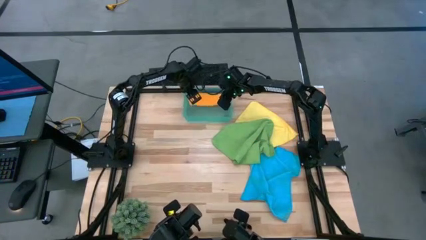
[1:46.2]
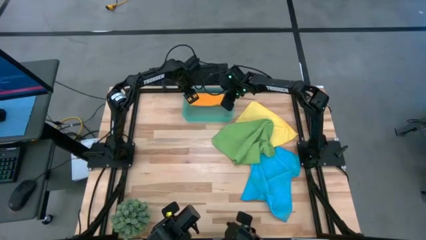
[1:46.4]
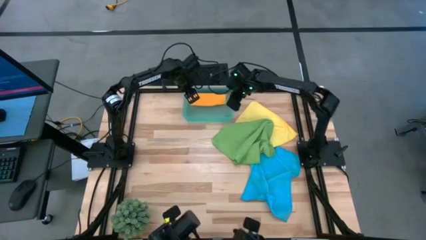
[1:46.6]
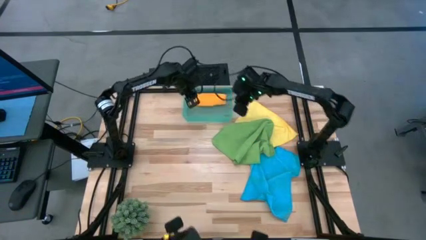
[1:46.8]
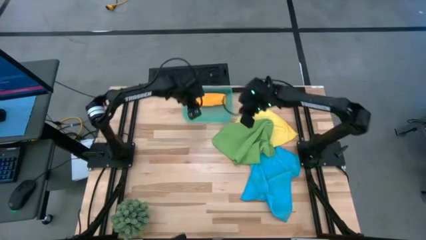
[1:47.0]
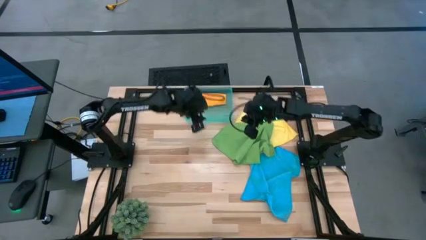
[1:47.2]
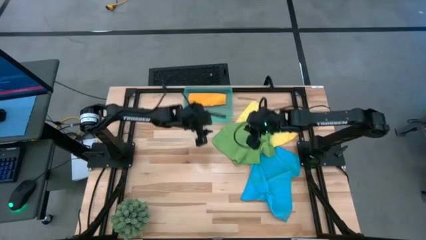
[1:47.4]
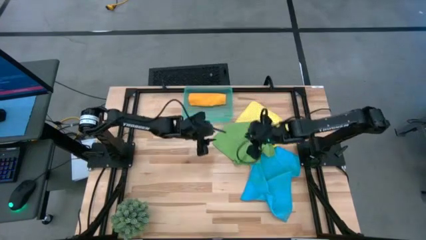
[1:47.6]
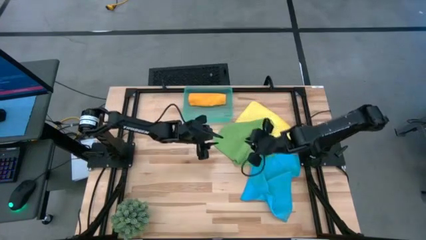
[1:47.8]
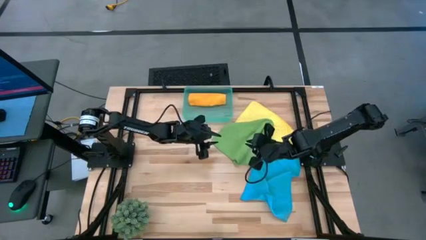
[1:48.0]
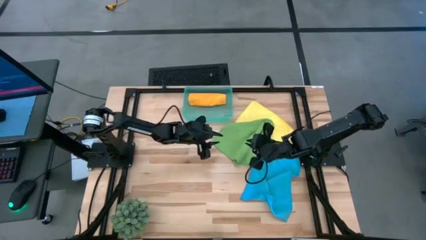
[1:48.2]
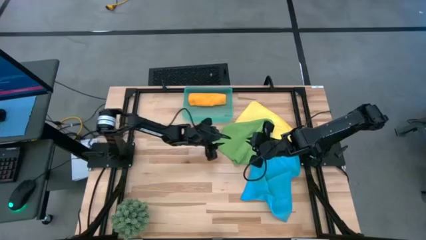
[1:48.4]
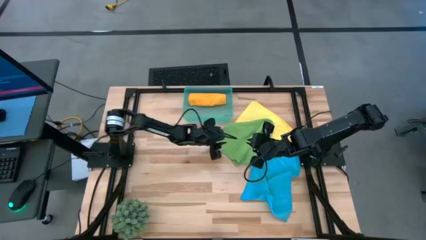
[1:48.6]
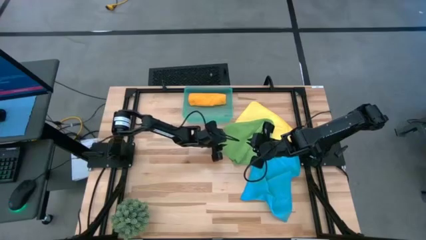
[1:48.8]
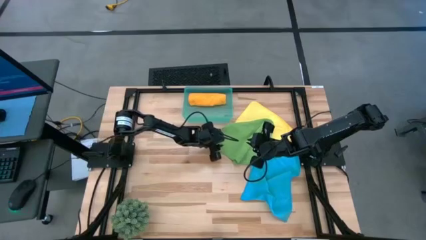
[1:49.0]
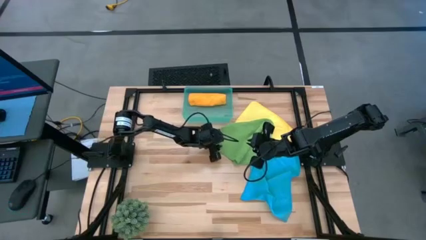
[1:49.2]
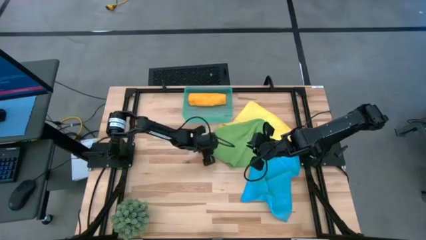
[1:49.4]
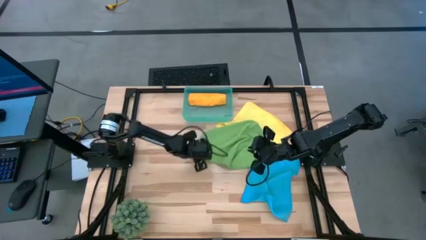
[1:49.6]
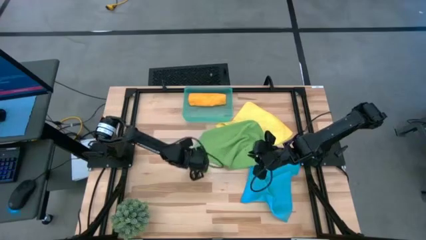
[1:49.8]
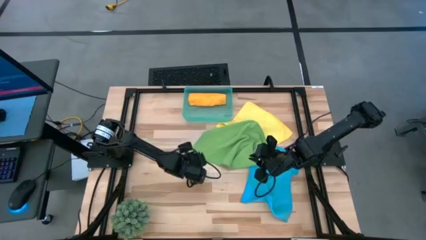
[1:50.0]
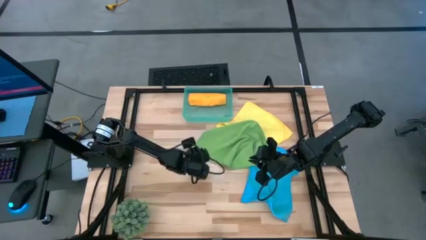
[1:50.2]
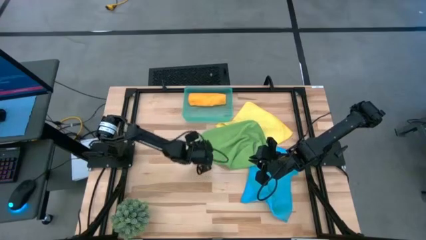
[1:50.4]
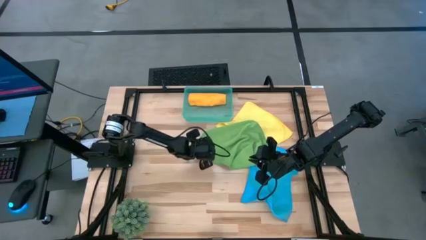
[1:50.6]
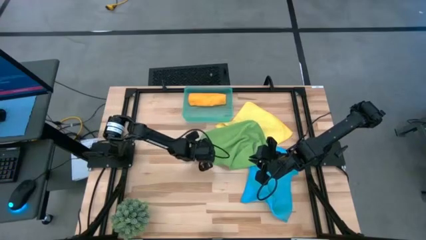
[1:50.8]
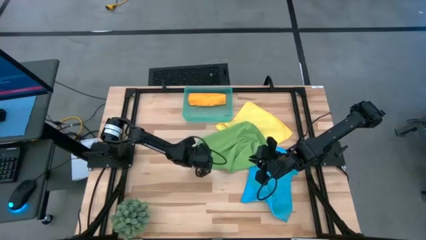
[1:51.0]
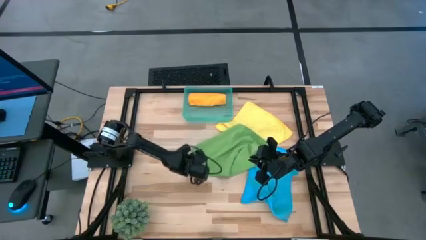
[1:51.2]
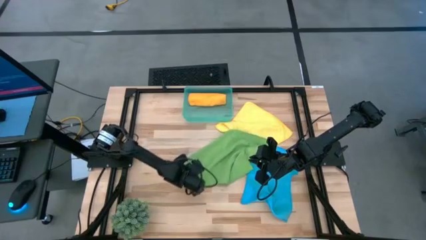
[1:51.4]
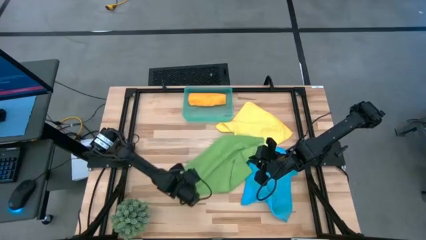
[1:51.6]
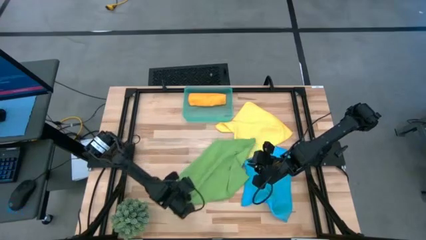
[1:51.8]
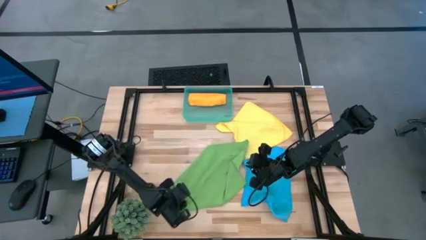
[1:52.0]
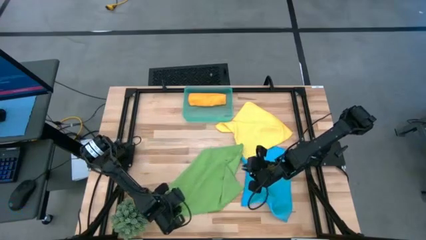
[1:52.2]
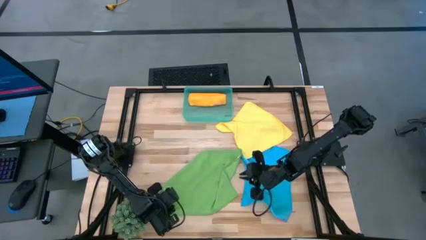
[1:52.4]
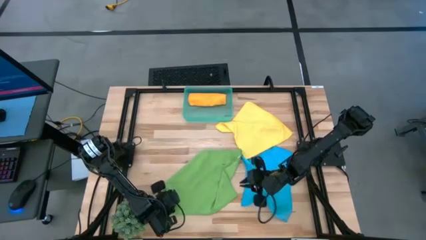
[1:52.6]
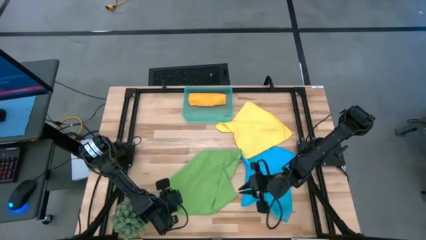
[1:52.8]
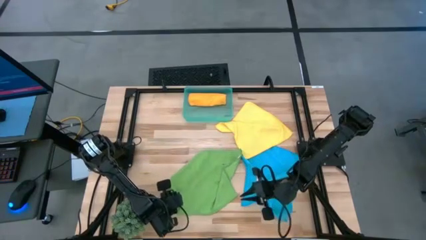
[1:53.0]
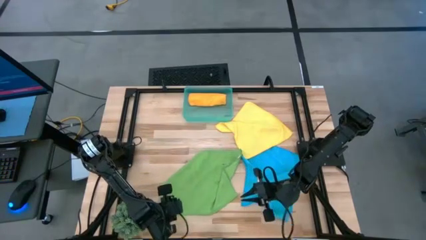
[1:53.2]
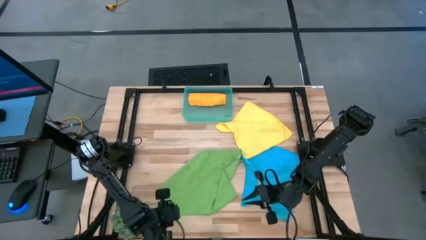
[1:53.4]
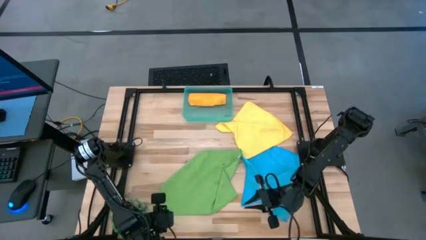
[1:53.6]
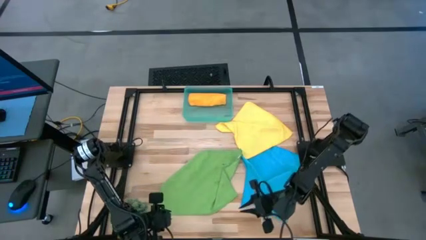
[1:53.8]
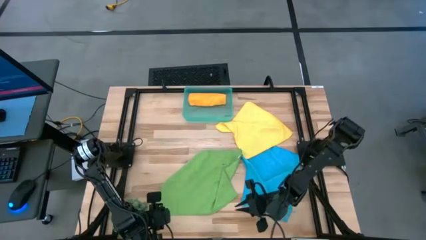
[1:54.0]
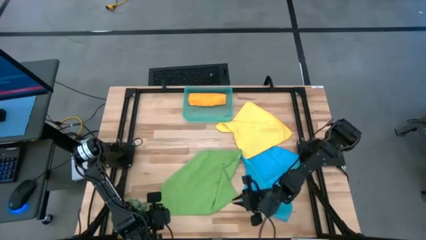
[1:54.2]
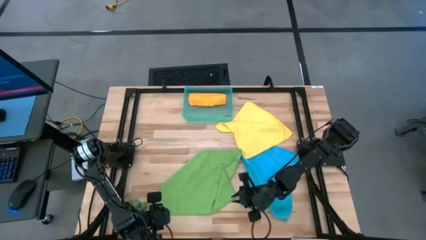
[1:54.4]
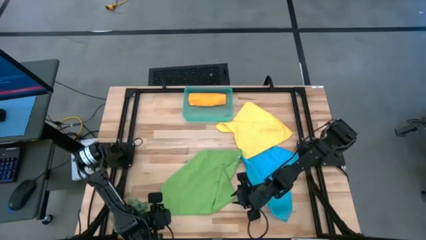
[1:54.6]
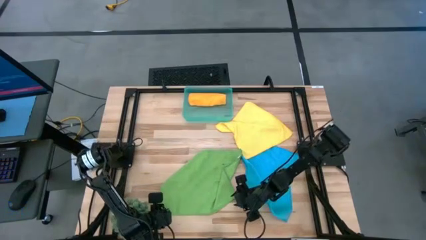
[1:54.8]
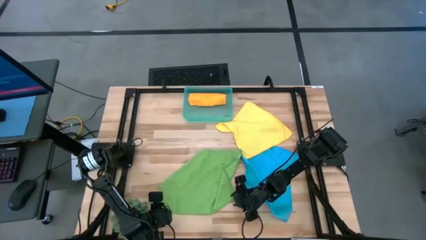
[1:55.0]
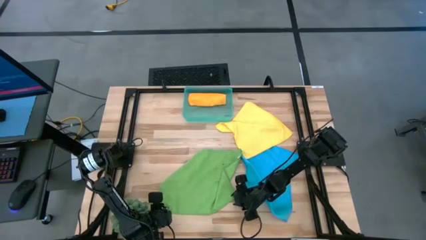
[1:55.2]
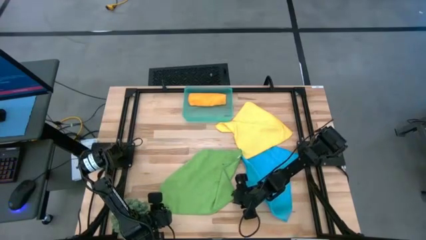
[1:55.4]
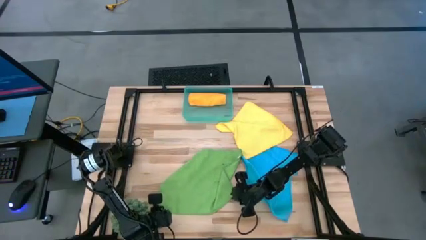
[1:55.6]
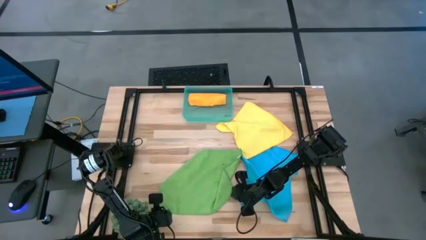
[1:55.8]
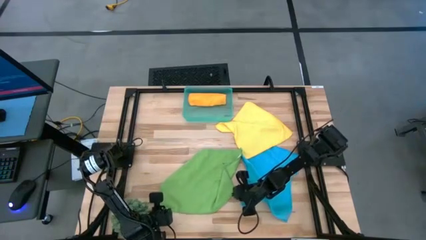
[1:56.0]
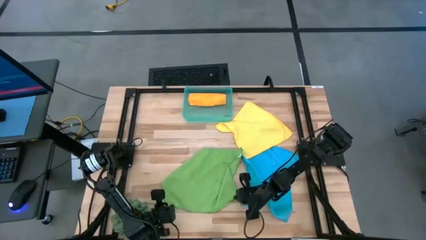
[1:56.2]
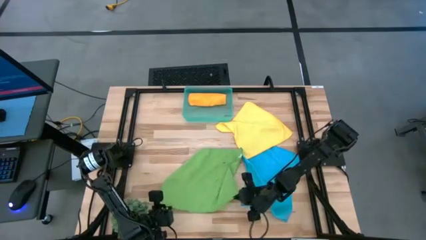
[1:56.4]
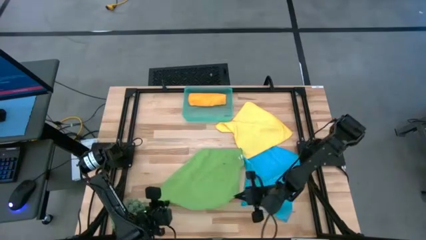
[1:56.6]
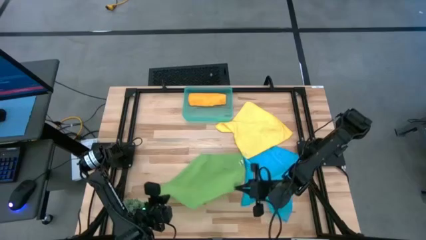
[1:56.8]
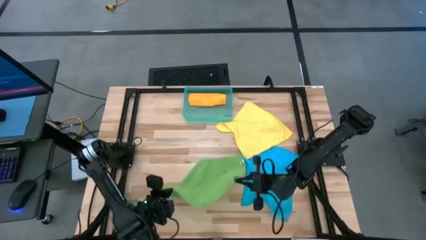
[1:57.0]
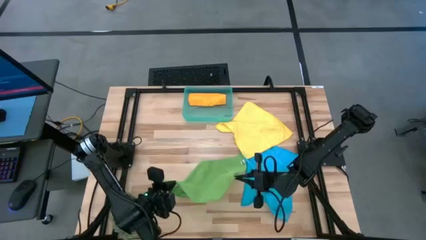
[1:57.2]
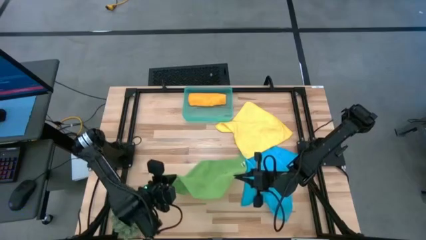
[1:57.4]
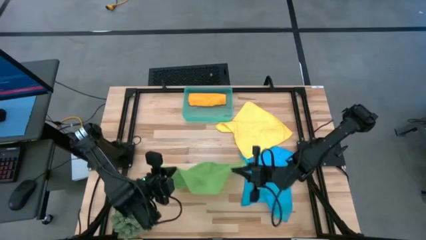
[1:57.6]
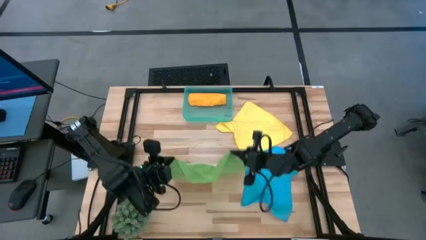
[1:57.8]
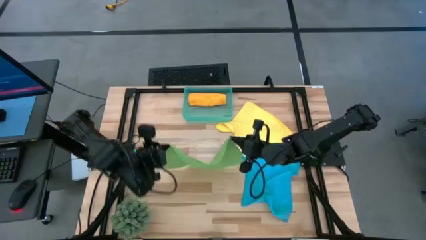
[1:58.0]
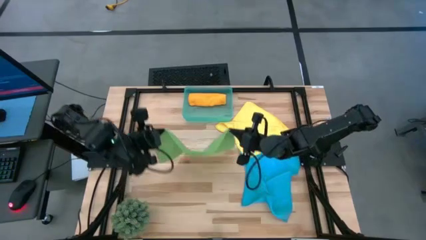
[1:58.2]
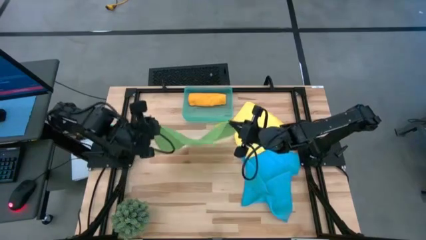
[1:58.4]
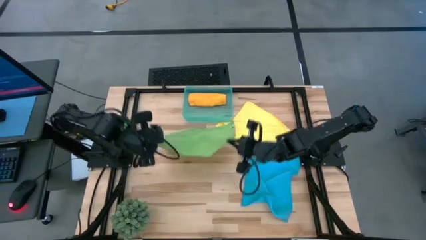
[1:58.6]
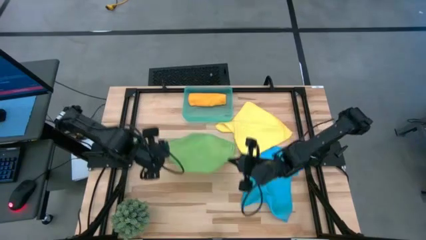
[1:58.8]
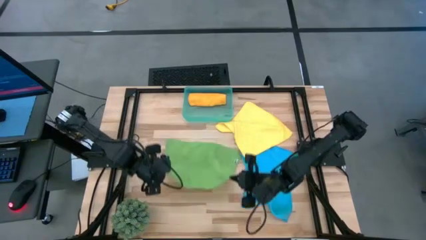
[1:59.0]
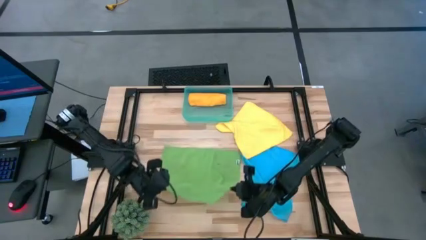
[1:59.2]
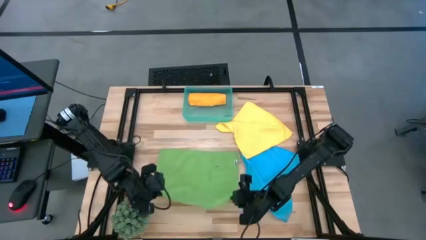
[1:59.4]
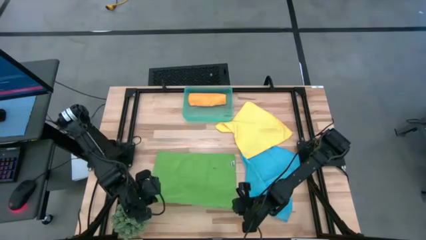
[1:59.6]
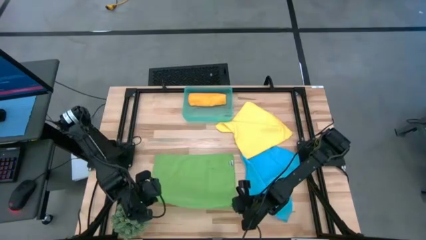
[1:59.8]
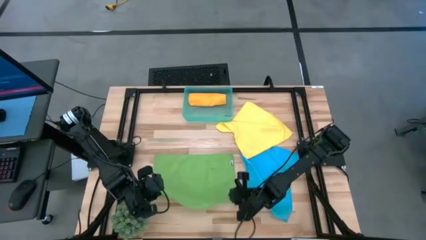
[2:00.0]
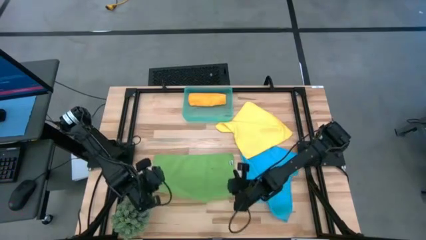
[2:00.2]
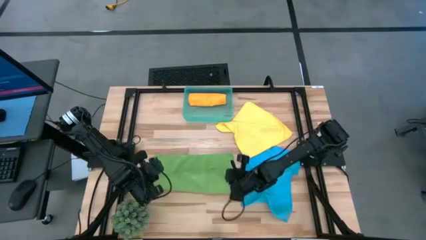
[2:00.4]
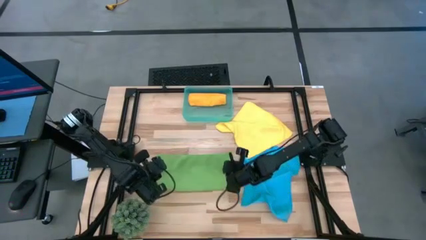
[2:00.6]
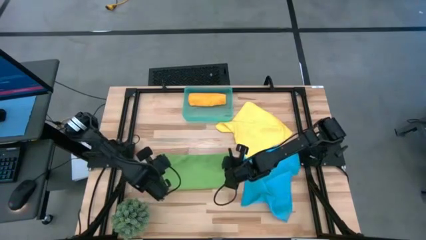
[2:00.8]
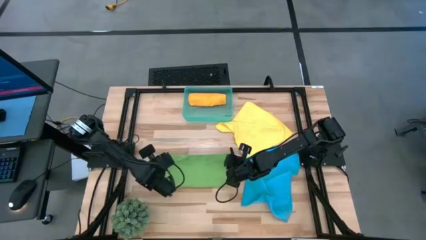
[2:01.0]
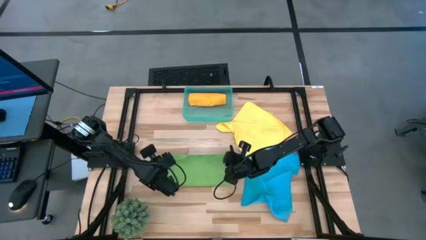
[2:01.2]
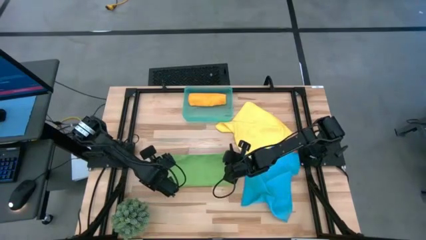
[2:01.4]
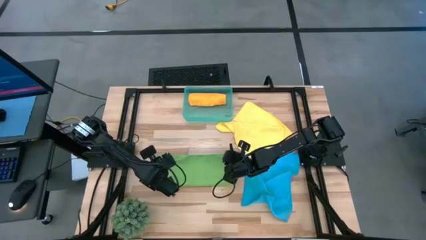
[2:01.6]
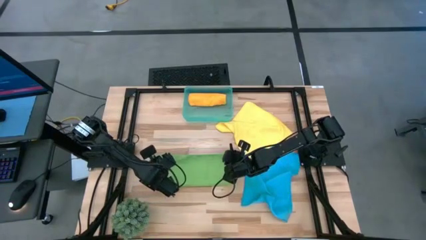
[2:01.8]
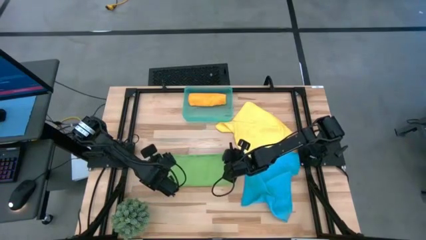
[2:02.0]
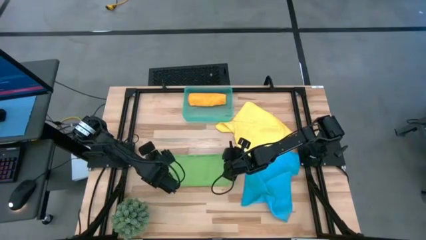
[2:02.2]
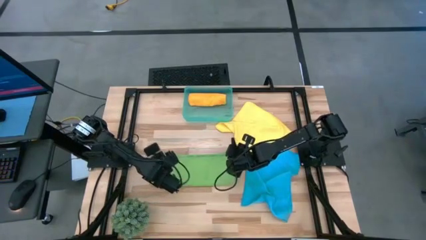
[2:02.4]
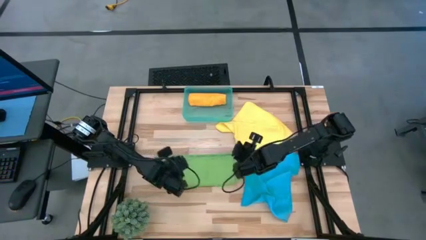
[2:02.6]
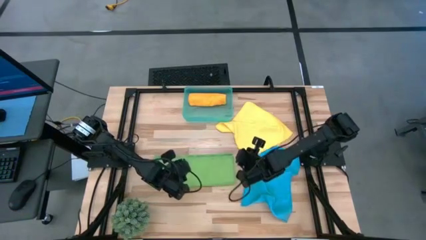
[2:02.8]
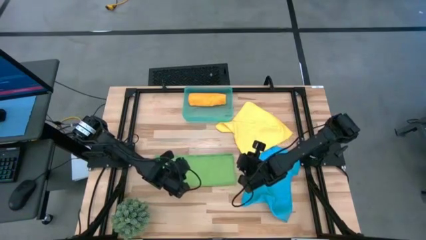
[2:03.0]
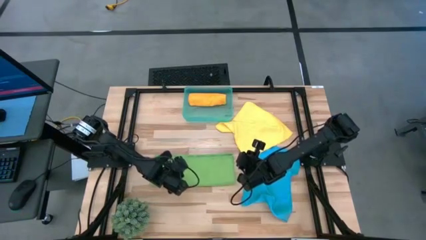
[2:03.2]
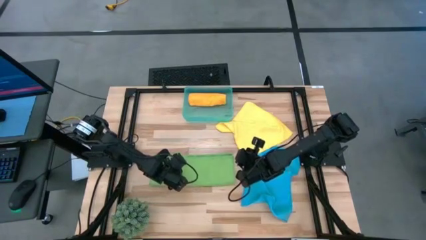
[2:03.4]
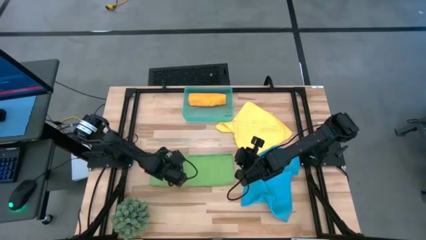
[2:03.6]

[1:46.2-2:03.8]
Task: Roll microfiber towels into tight, uniform cylinder then place into a basket
Fold the green towel
